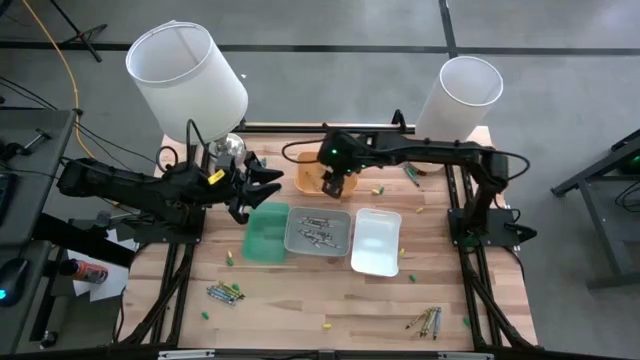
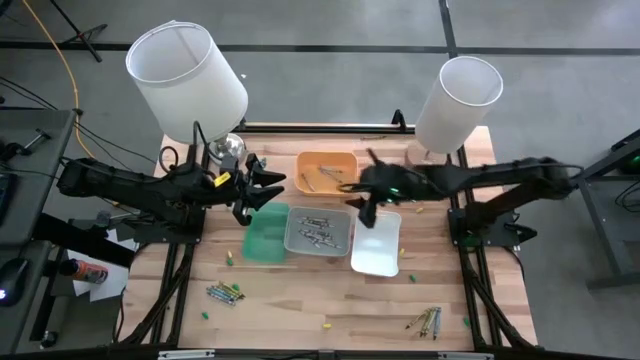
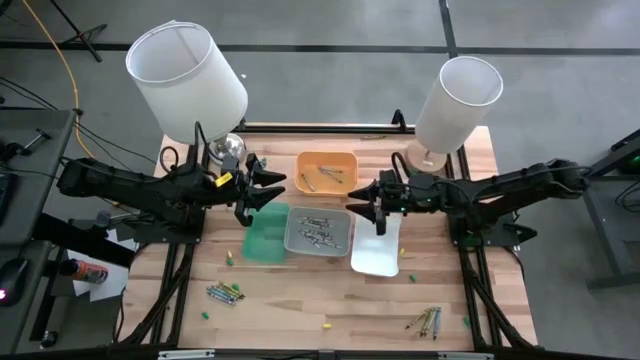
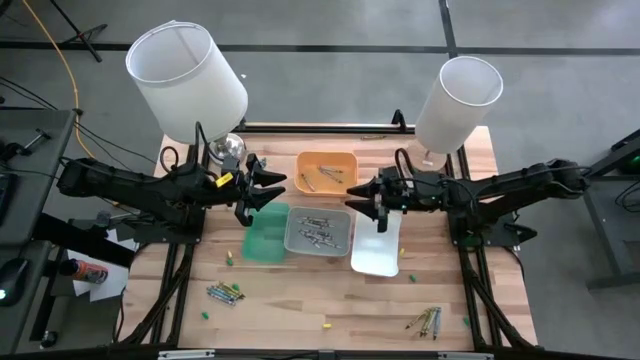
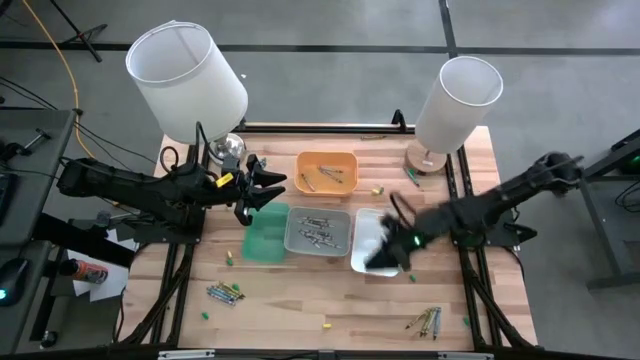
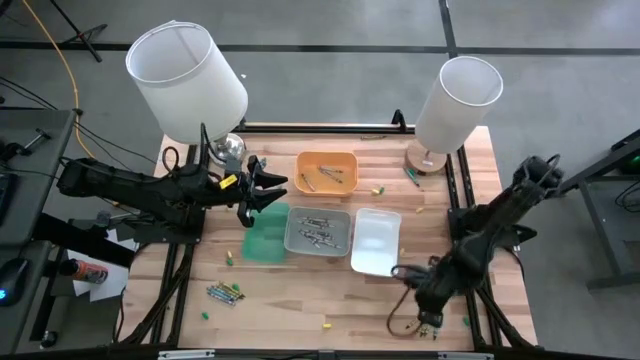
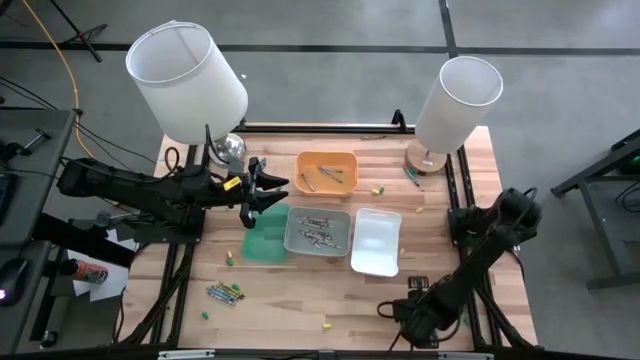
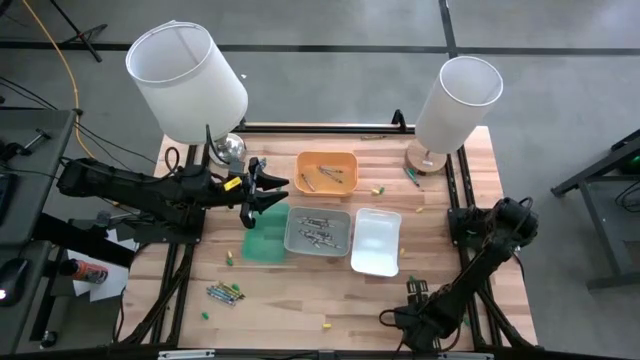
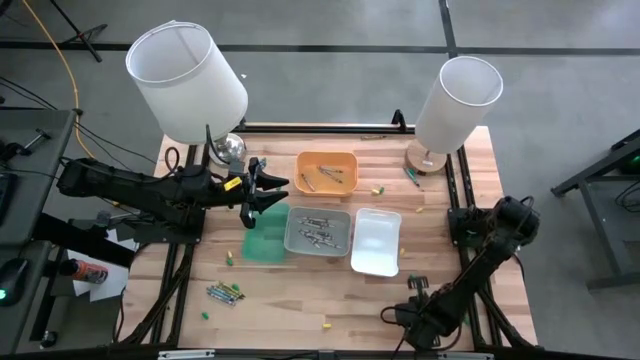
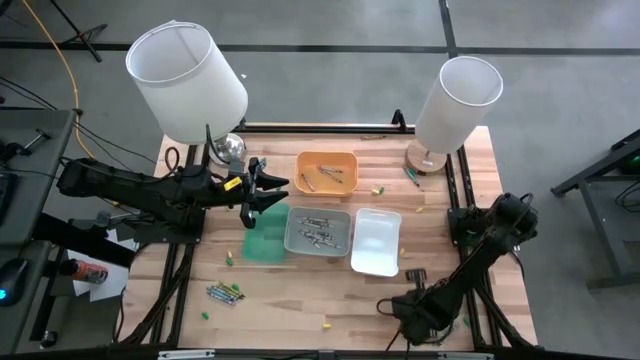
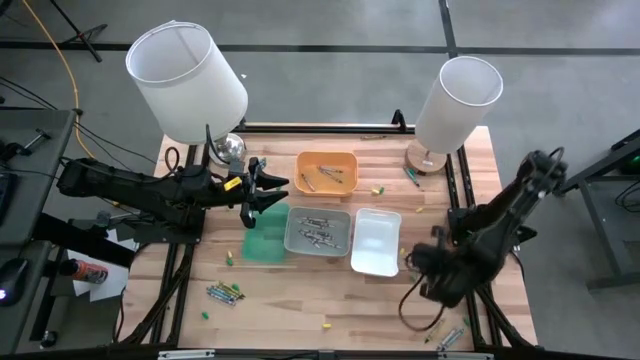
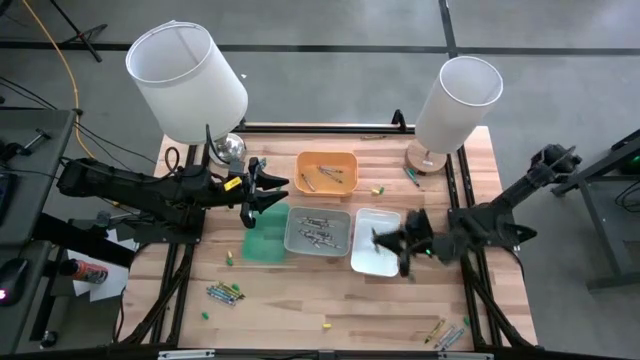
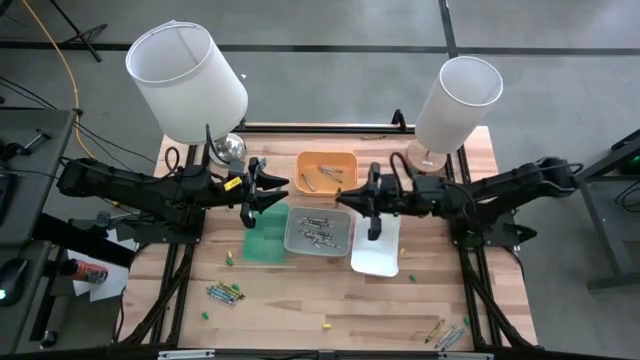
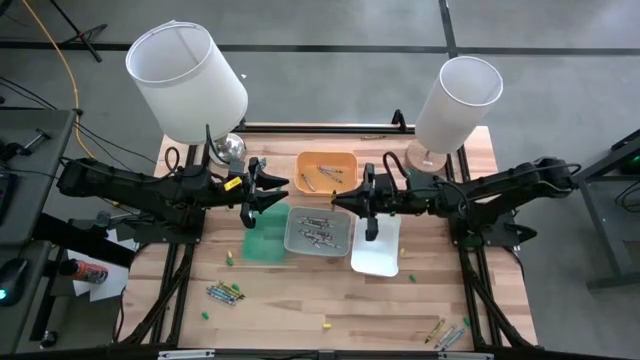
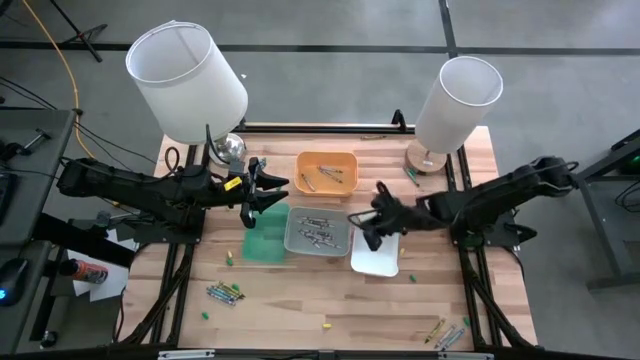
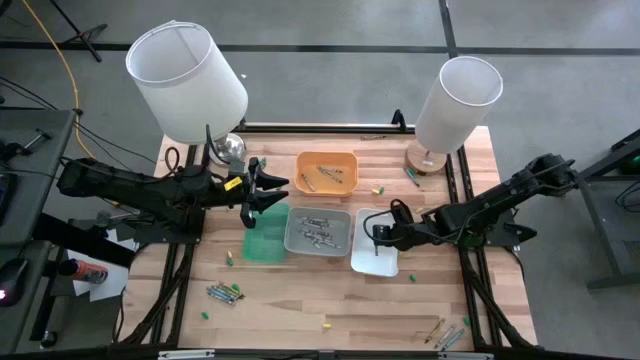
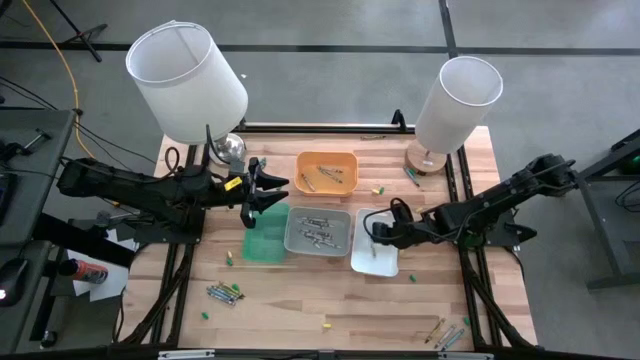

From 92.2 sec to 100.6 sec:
Task: Sort crayons
Put the green crayon into the white bin

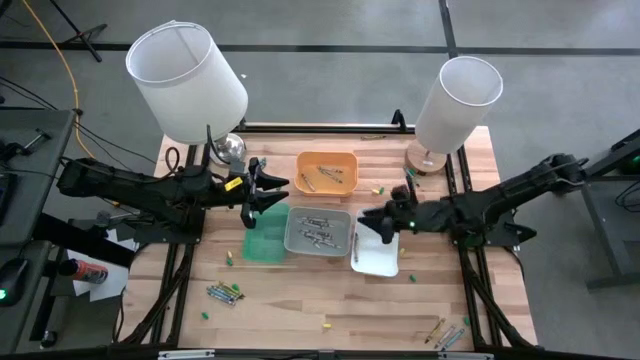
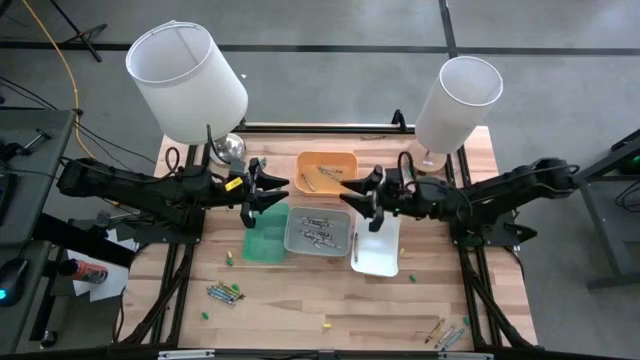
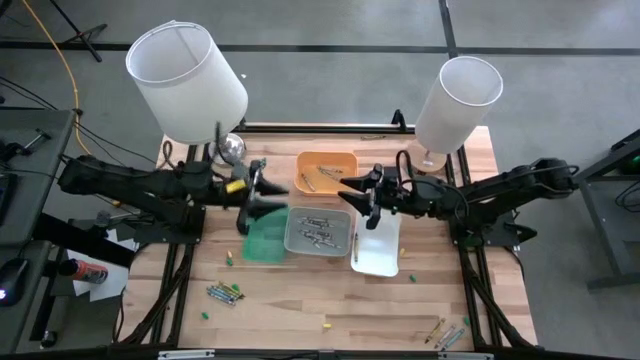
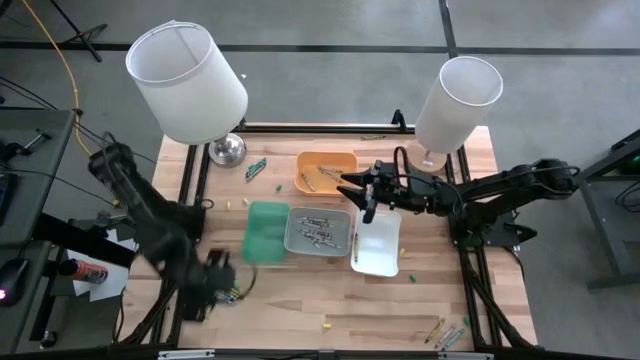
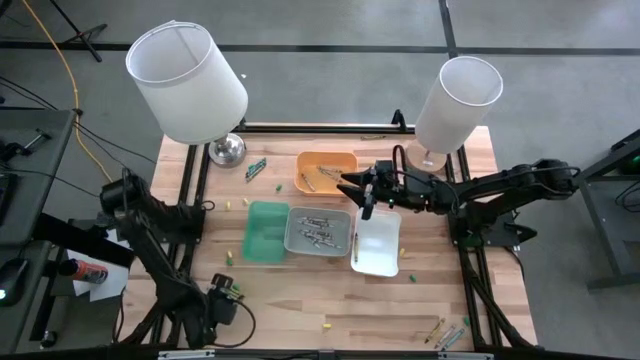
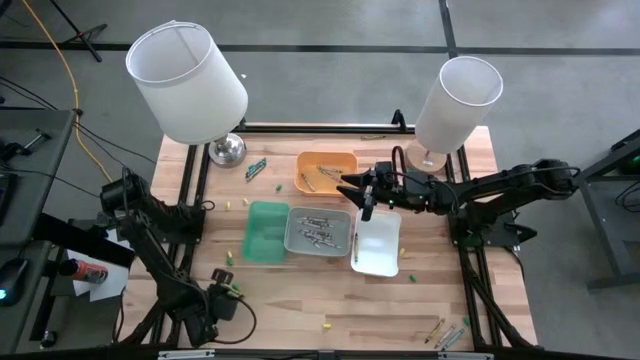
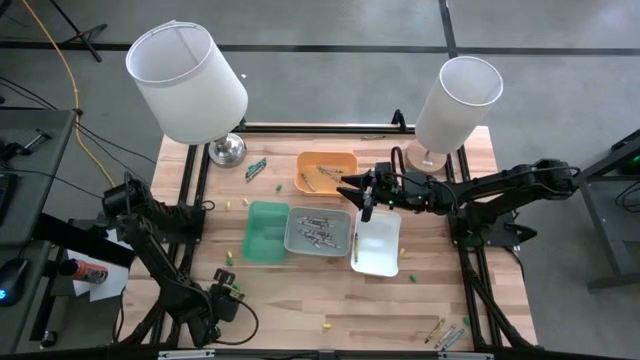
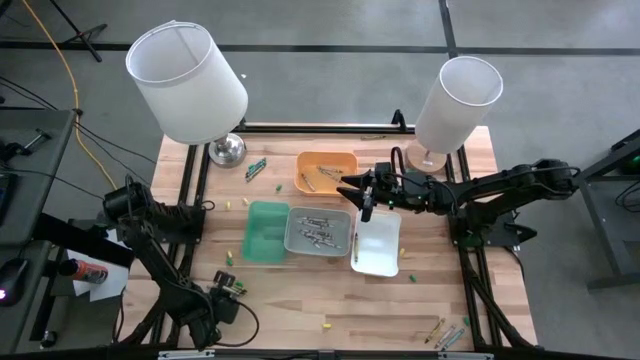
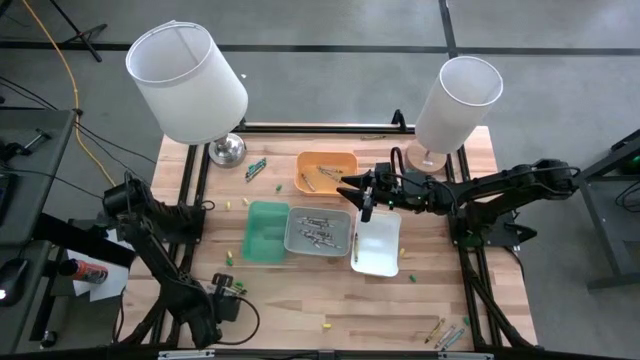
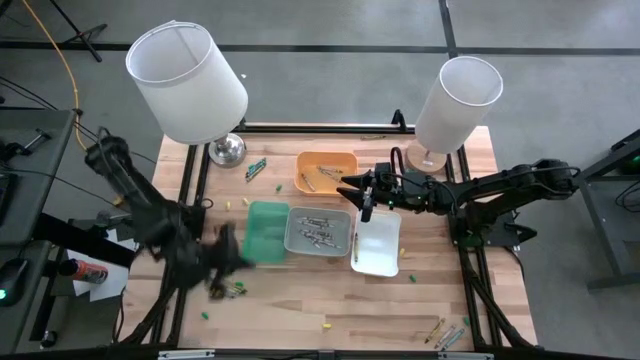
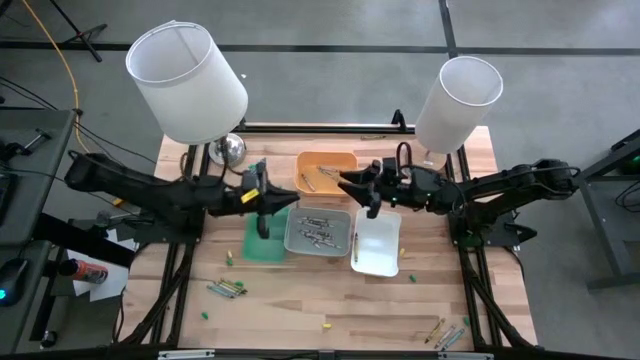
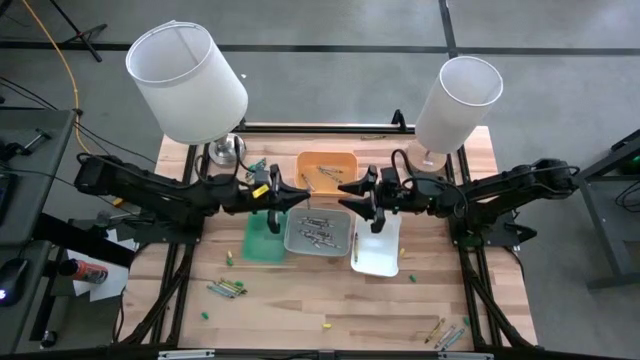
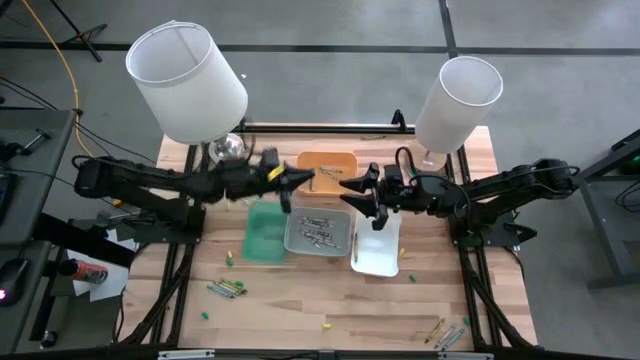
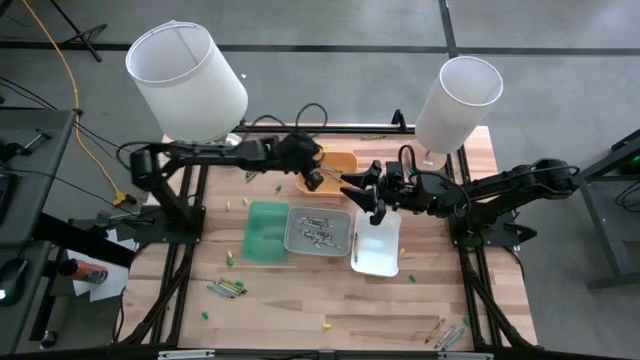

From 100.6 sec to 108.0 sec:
Put the gray crayon into the yellow bin

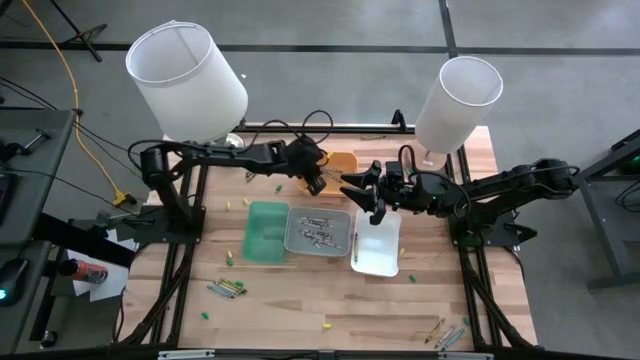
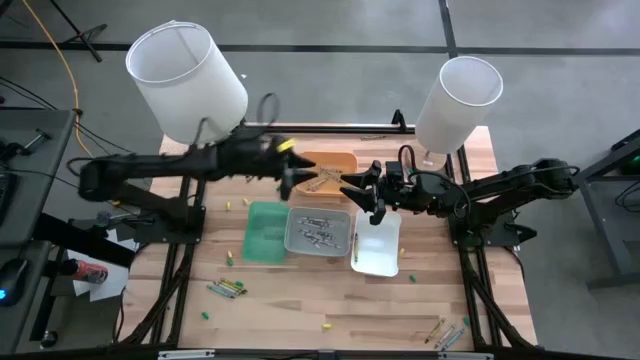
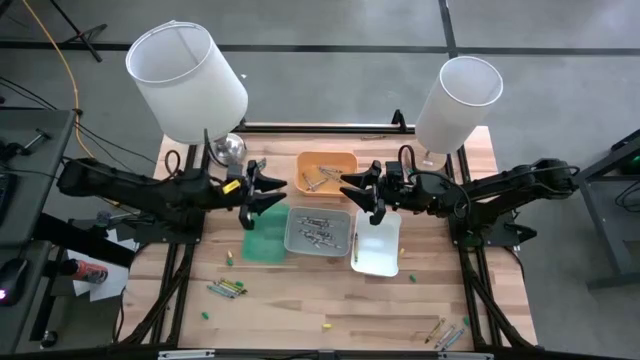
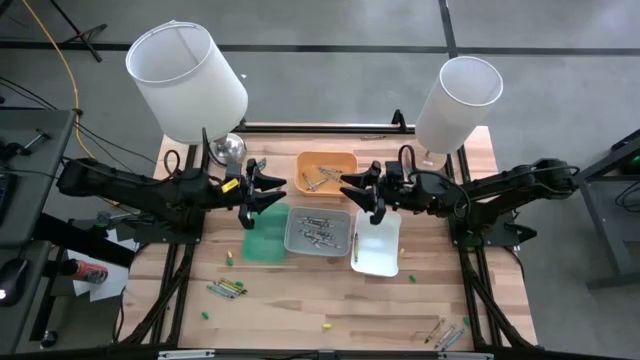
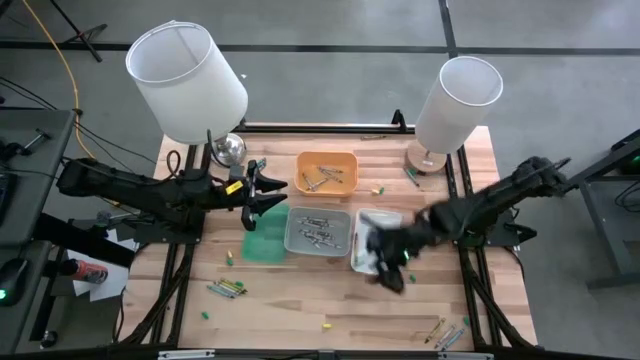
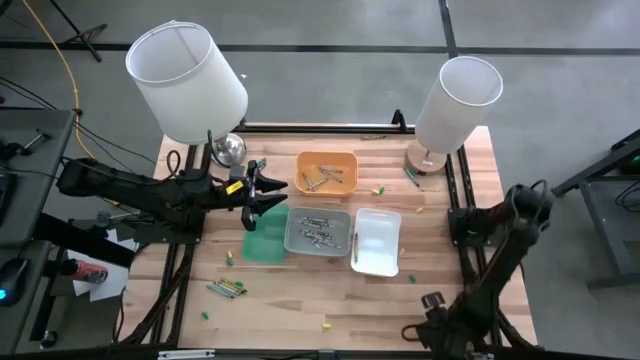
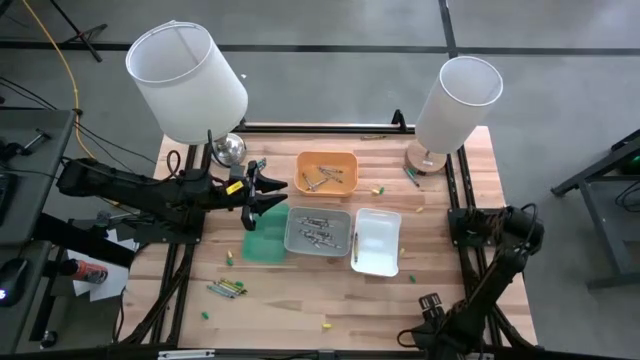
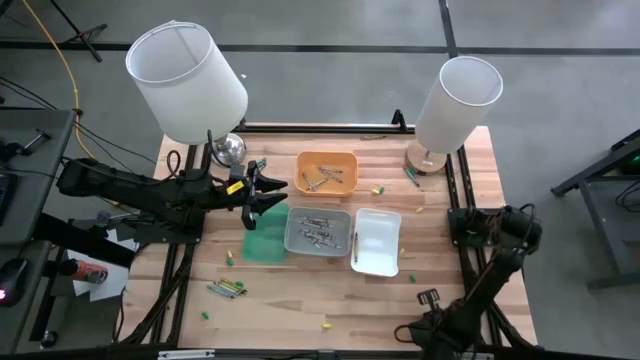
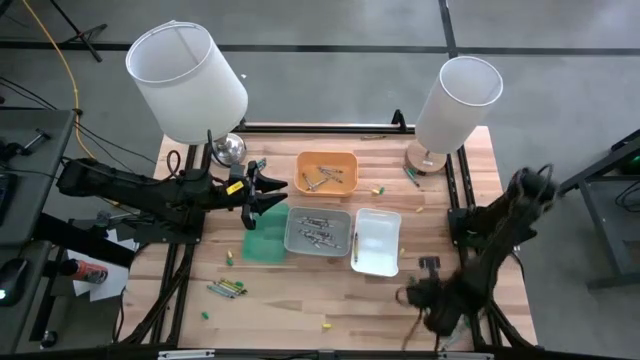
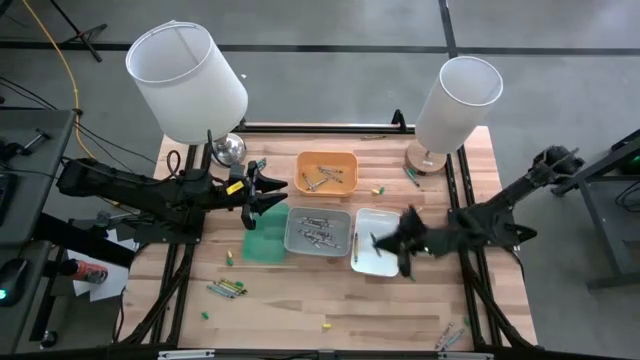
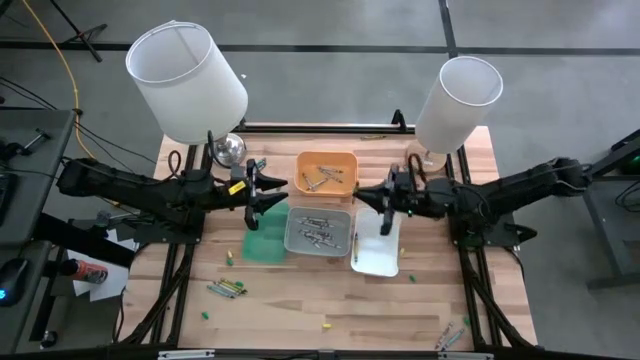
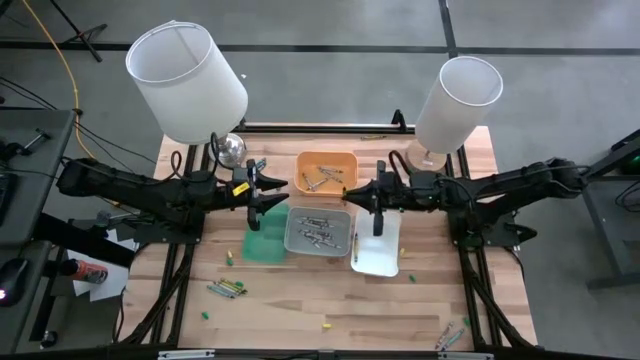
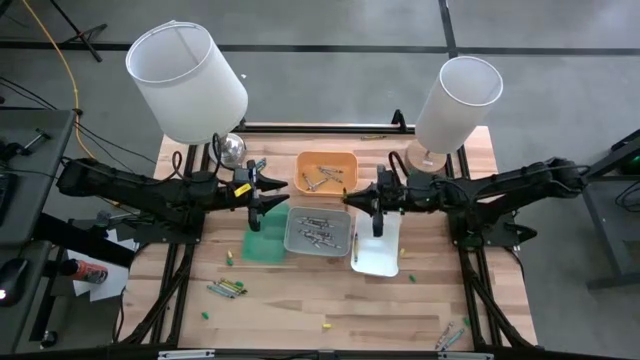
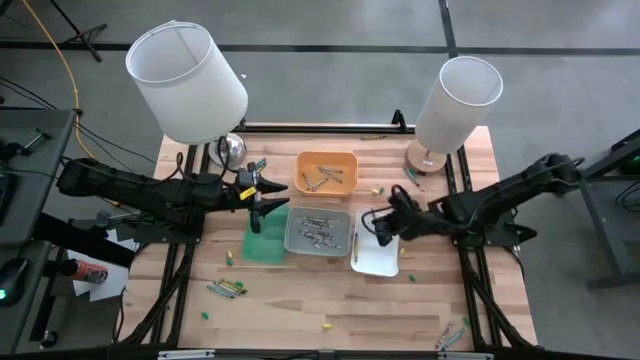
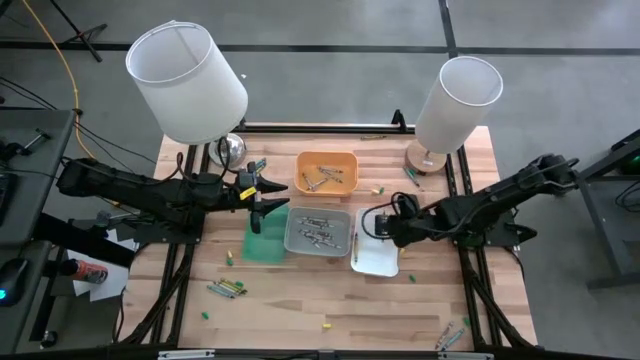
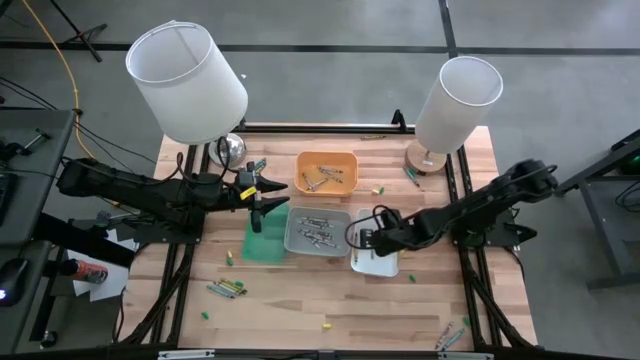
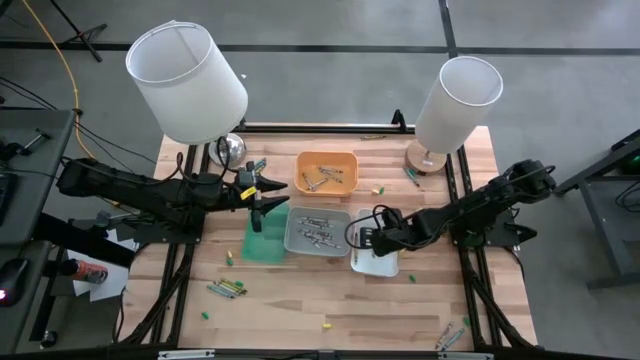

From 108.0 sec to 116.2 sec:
Put the green crayon into the white bin
